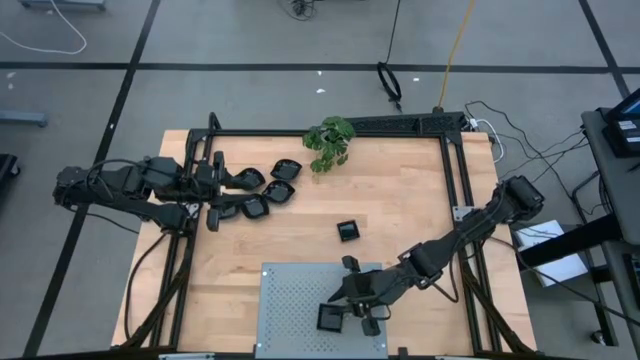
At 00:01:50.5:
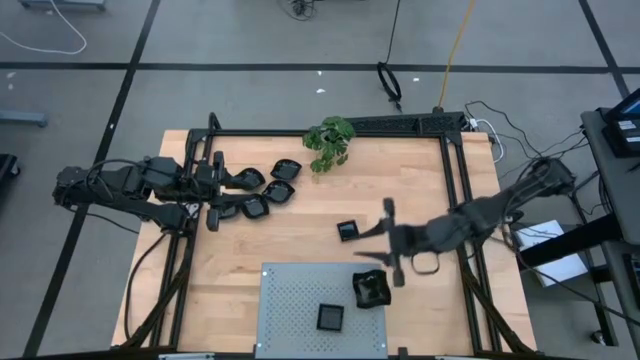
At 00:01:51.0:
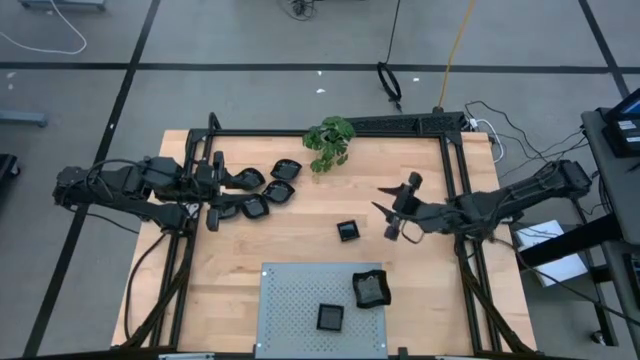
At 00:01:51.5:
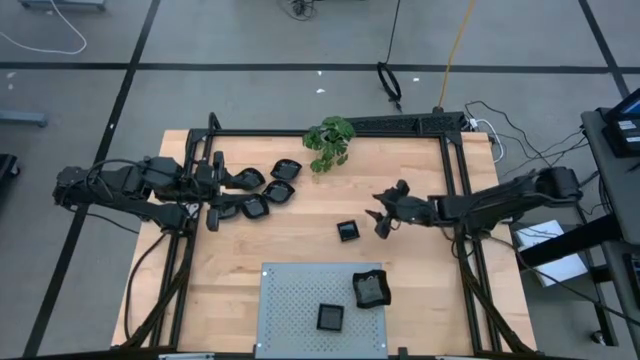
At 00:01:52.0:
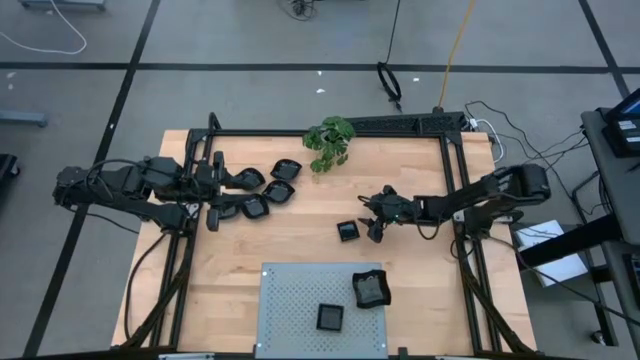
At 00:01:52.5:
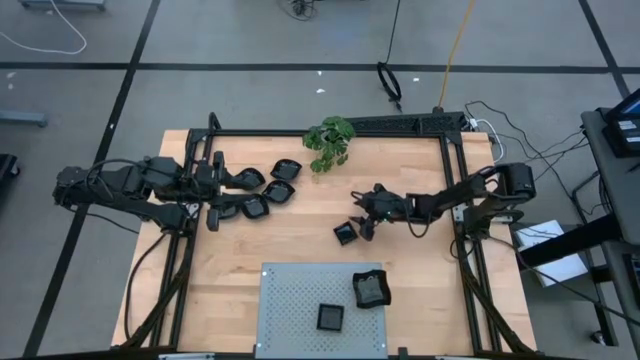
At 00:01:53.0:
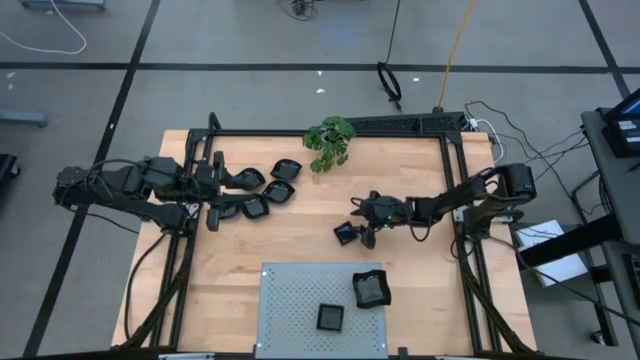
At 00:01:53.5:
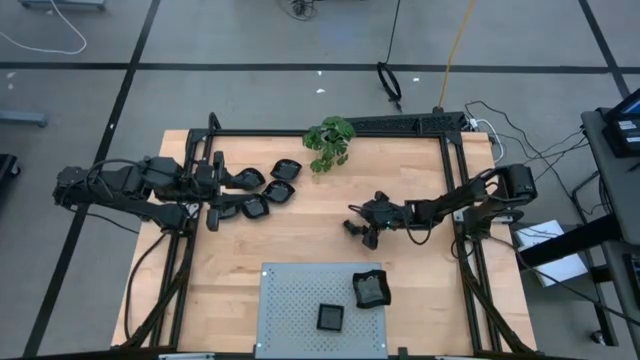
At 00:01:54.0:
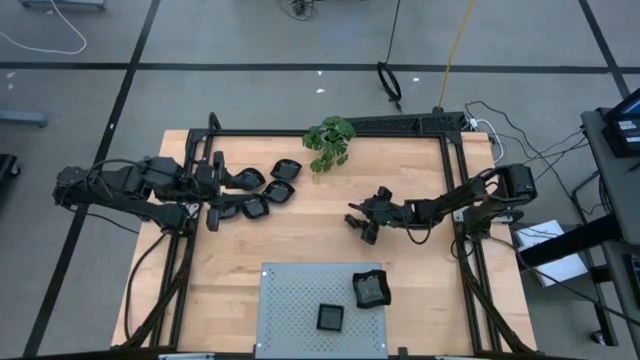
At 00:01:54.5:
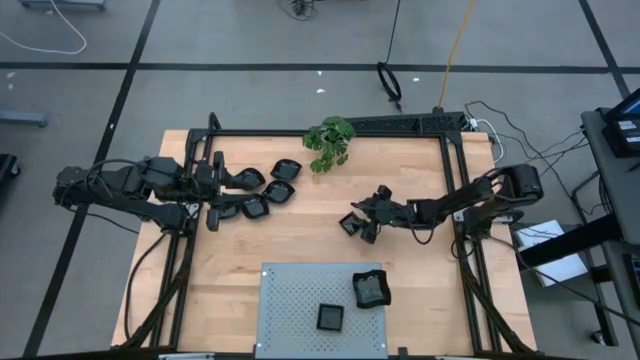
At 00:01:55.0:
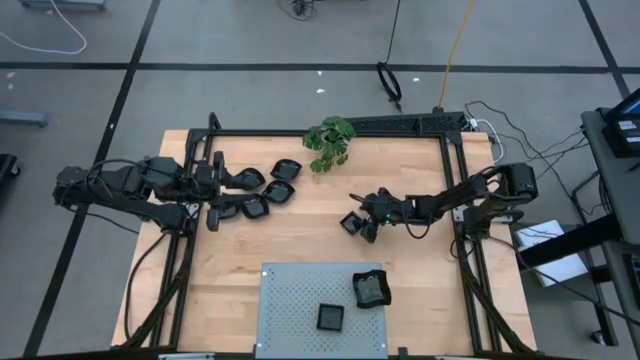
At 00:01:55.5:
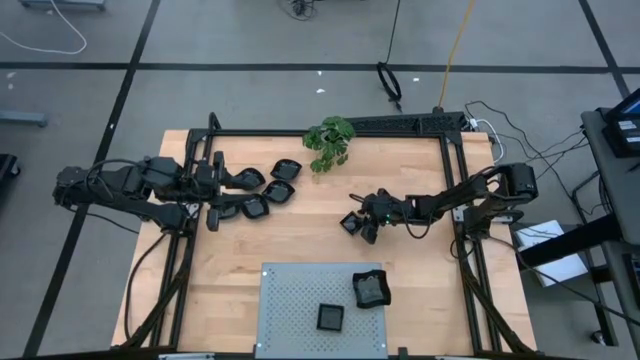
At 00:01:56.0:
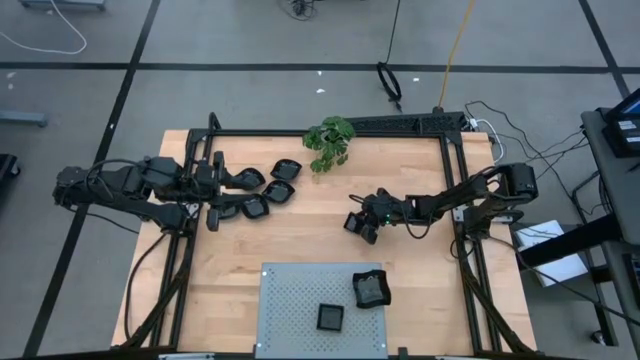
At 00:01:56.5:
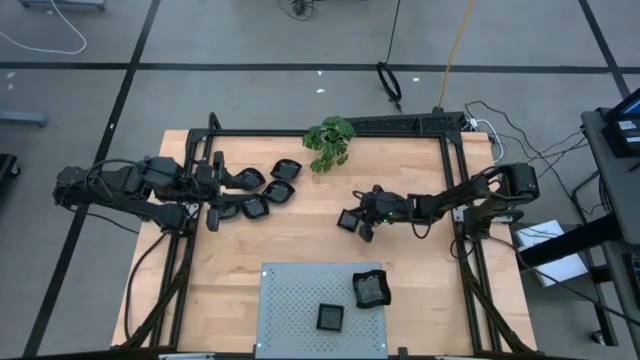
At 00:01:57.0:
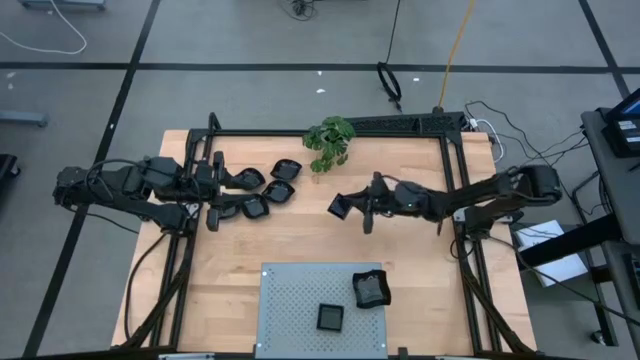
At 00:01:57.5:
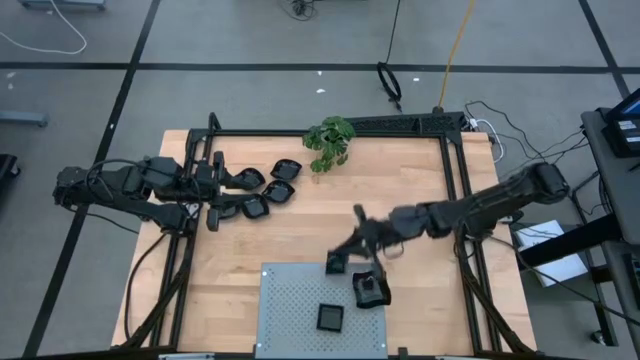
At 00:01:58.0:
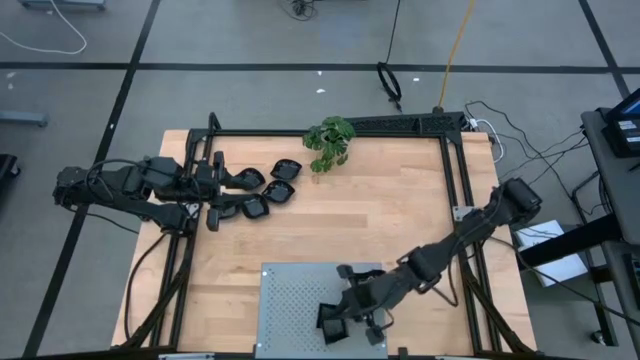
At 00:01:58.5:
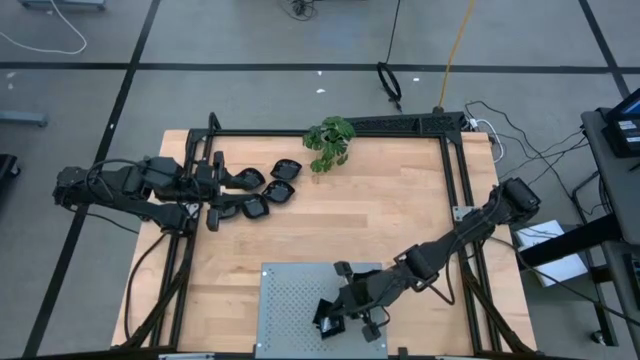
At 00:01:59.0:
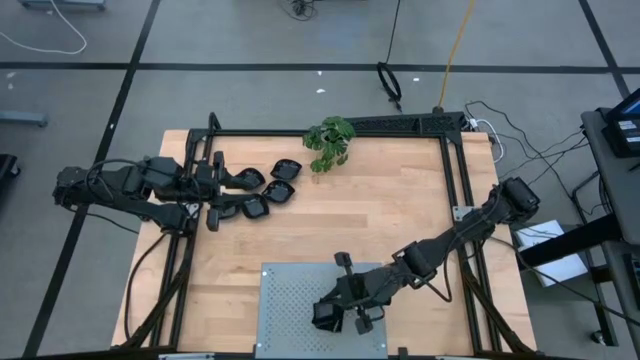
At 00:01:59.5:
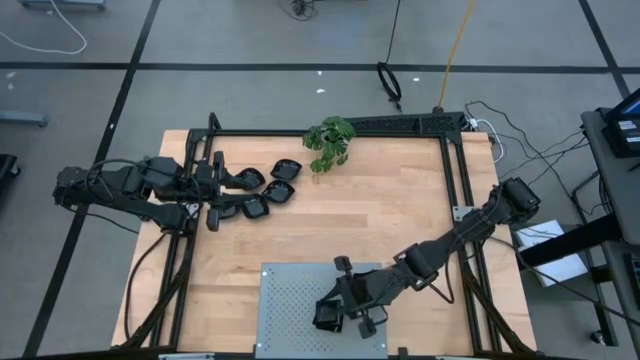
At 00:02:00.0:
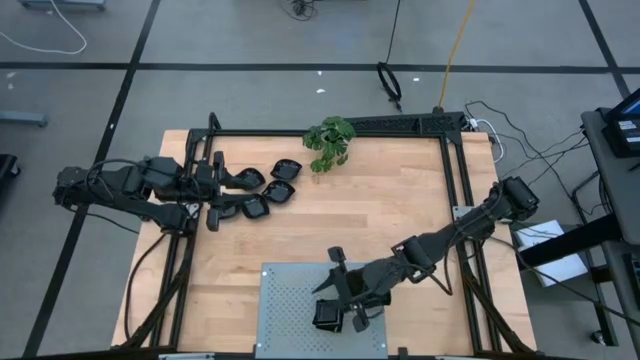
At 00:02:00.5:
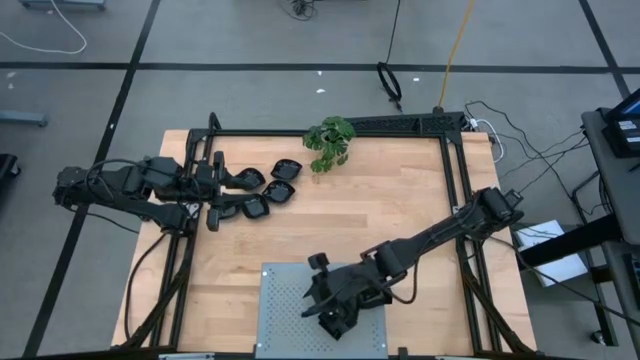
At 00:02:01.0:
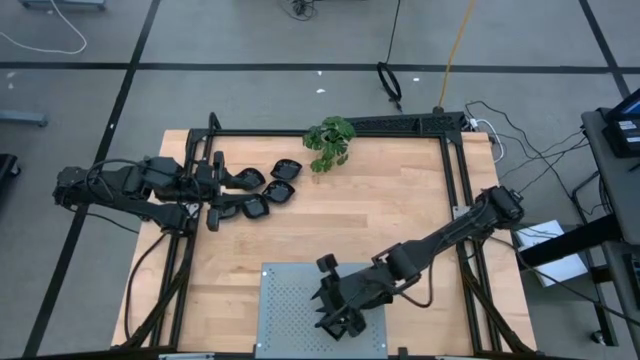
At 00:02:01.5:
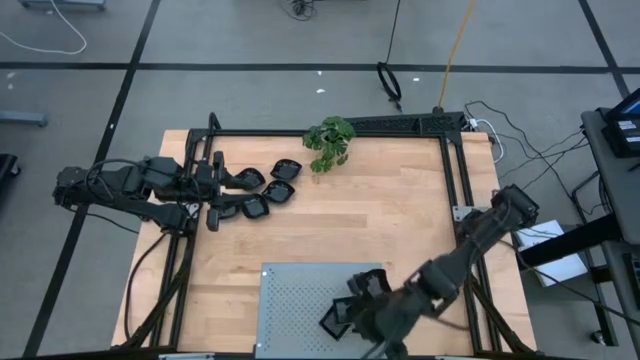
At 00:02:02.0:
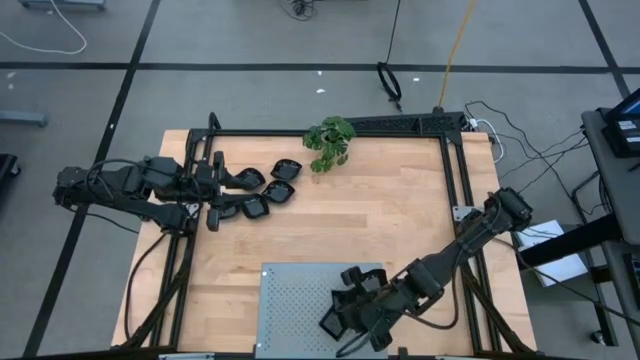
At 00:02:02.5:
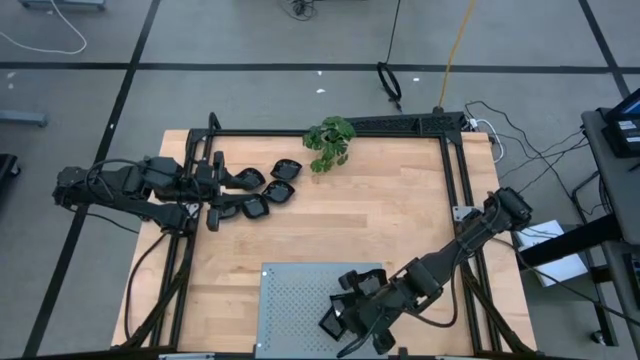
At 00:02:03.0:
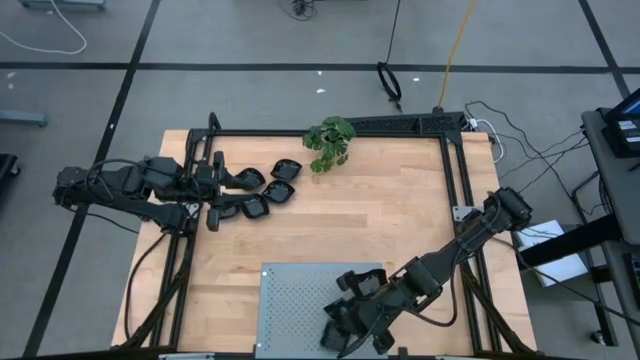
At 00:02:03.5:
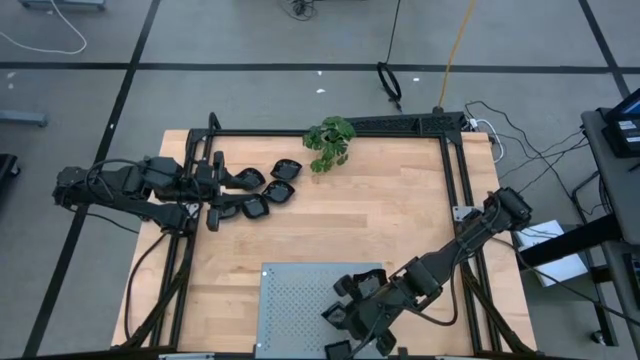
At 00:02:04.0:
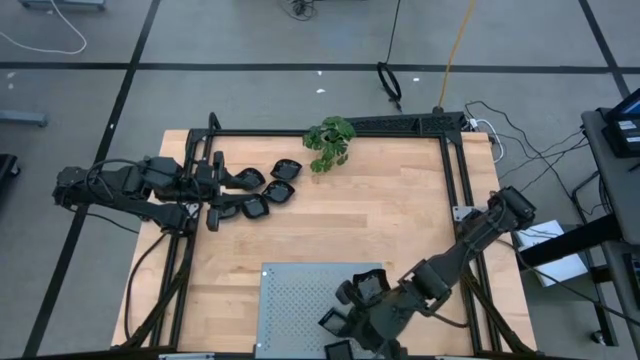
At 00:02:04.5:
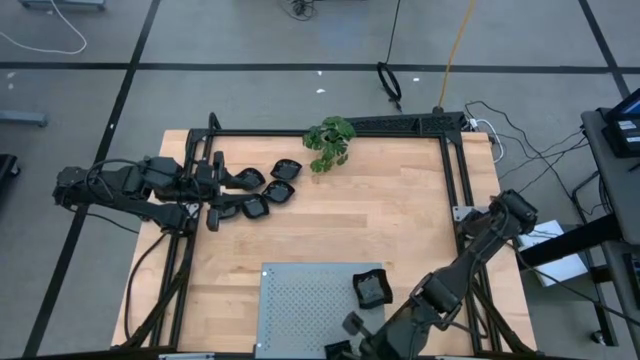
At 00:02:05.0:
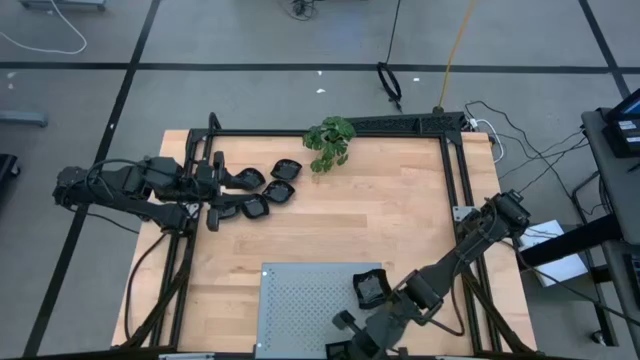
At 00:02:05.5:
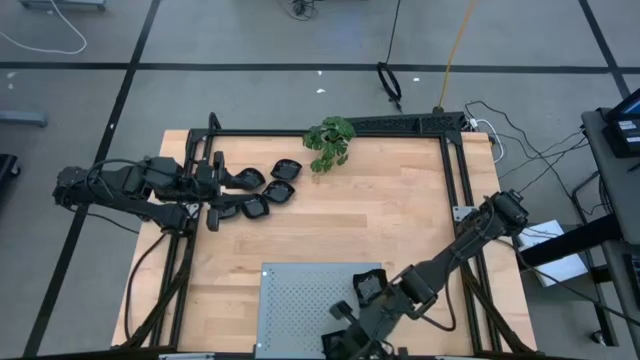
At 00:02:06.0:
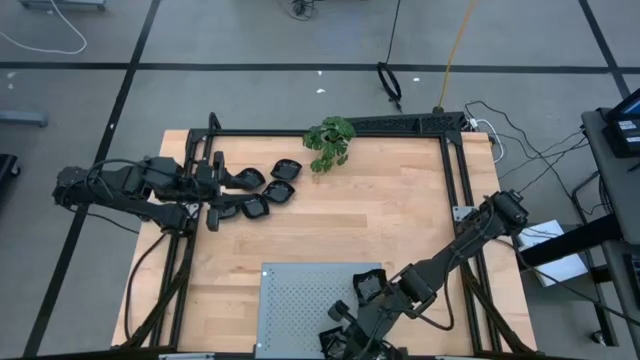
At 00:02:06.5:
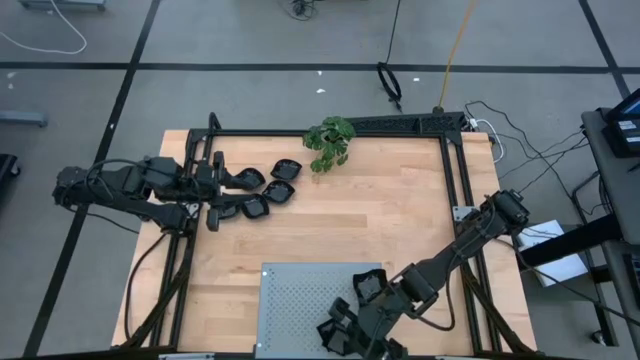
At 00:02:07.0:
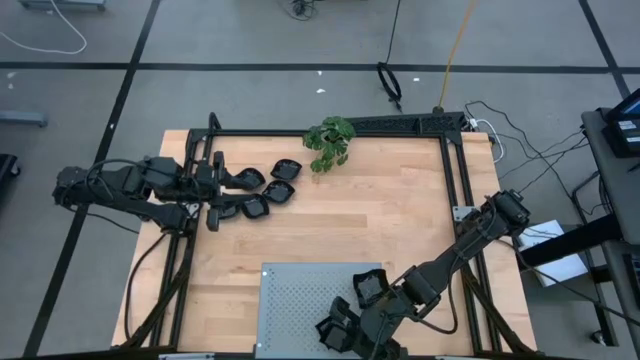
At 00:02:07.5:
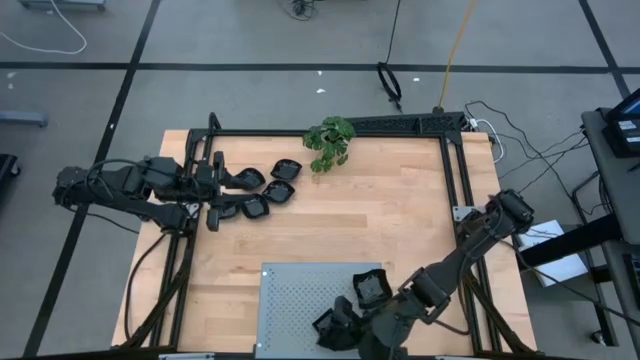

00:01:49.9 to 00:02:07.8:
Task: Pick & Place Mini shaped plates
Stack the square plate onto the stacked square plate on the shelf

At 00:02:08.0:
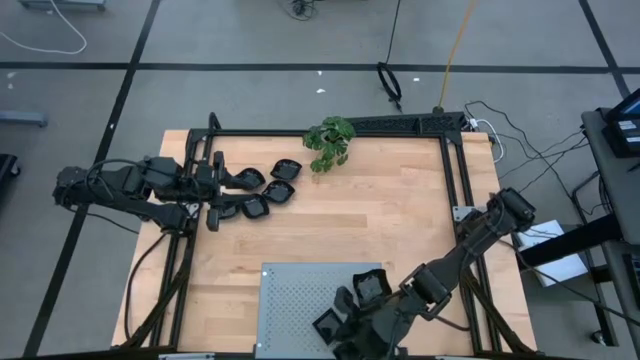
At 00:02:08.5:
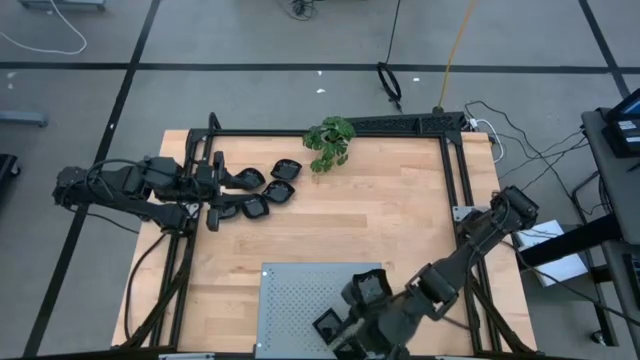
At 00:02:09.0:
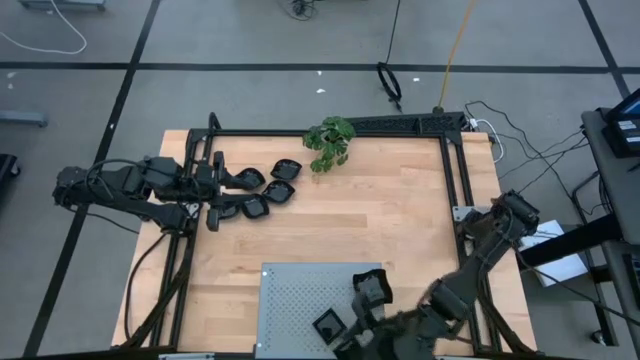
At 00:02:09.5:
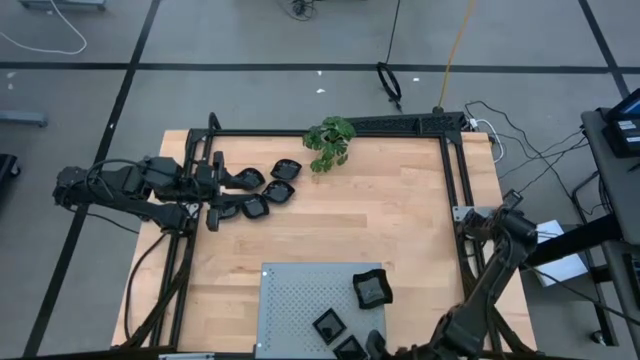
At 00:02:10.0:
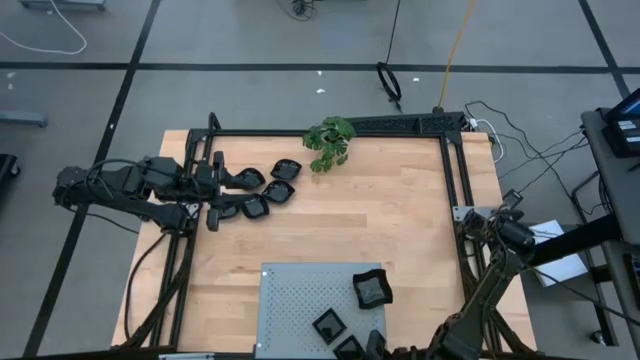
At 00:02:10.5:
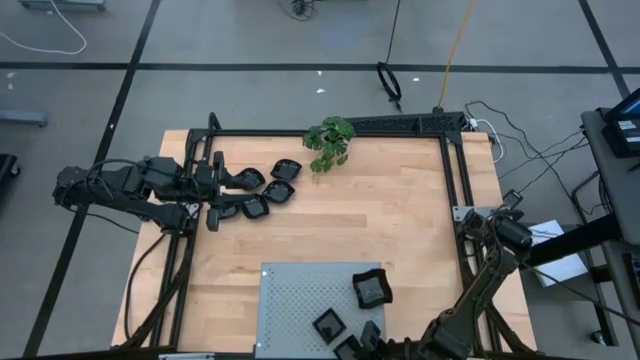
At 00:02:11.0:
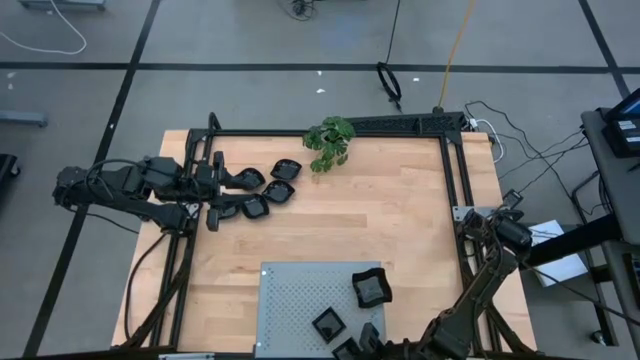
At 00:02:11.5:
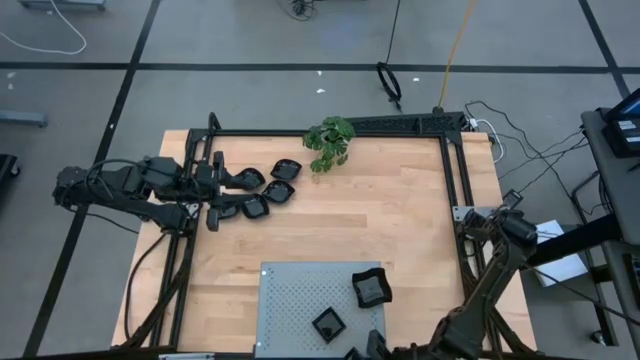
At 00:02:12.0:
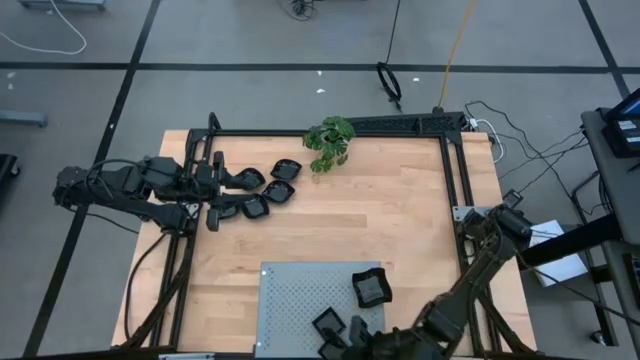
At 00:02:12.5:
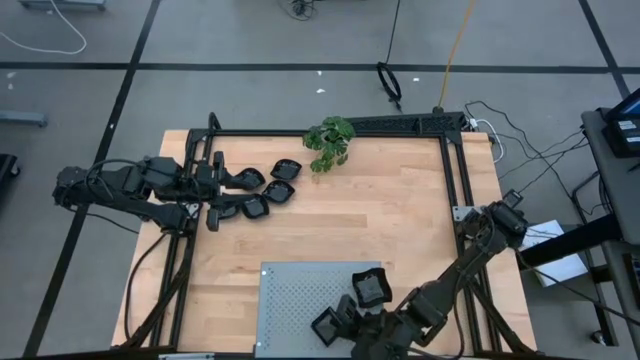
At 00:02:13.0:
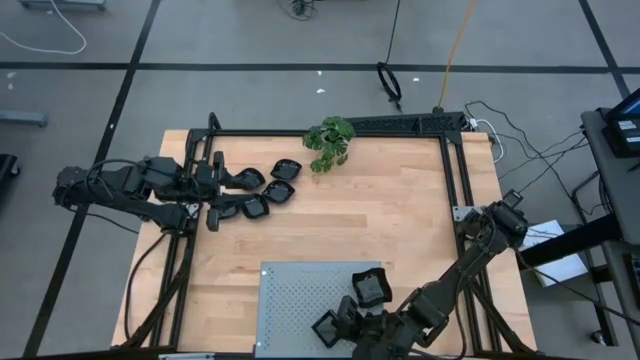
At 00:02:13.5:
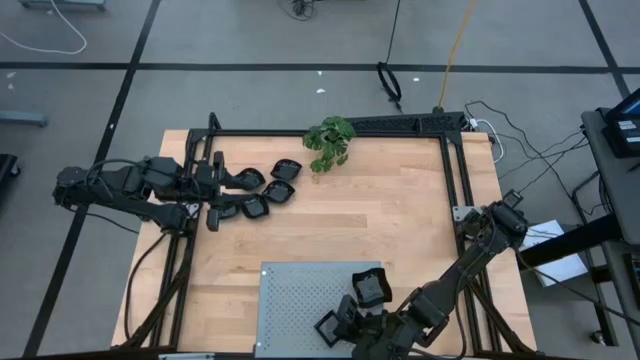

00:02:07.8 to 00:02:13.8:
Stack the square plate onto the stacked square plate on the shelf
